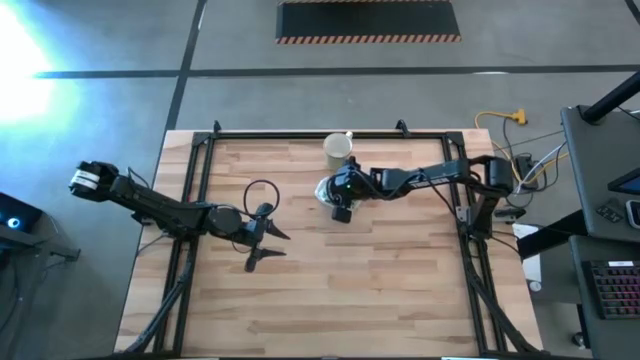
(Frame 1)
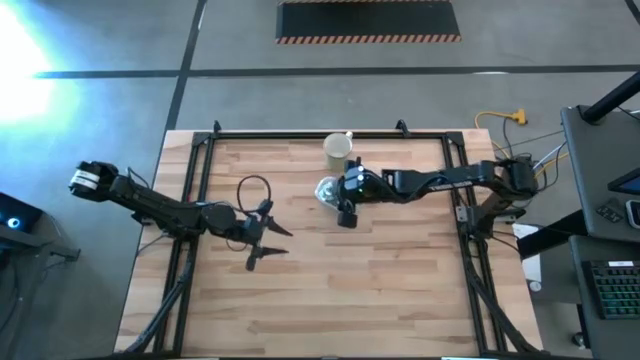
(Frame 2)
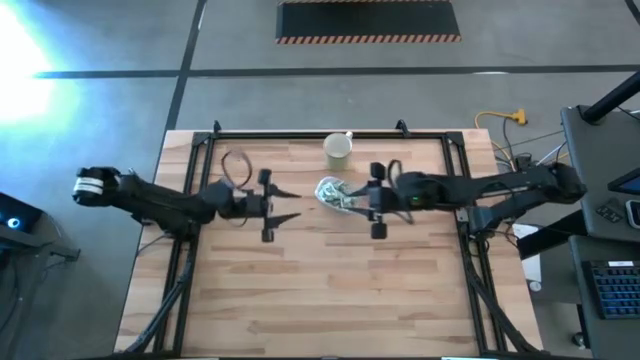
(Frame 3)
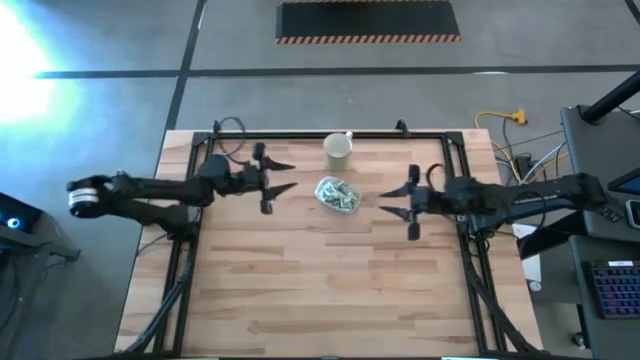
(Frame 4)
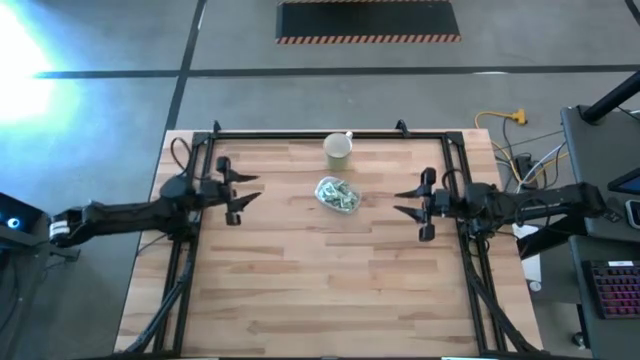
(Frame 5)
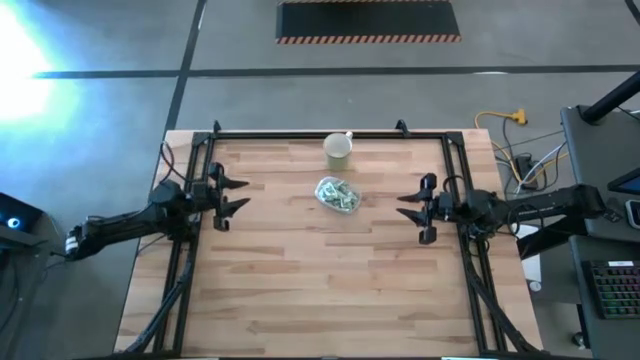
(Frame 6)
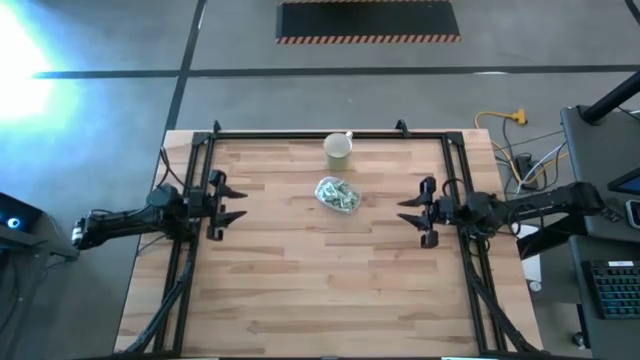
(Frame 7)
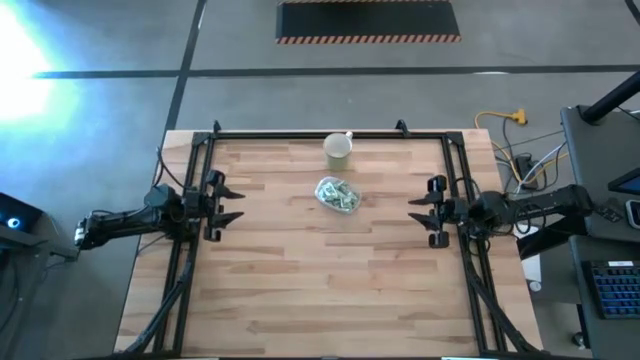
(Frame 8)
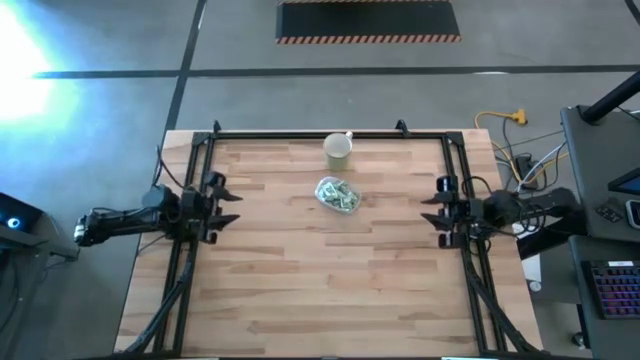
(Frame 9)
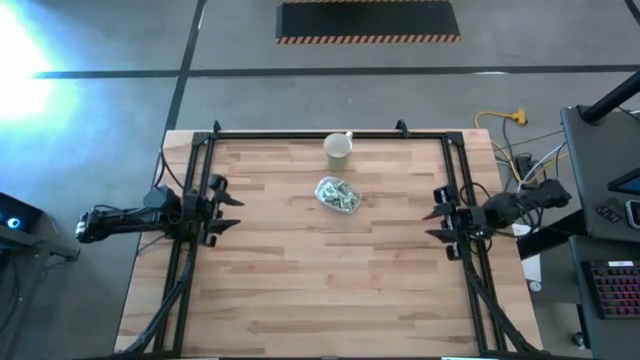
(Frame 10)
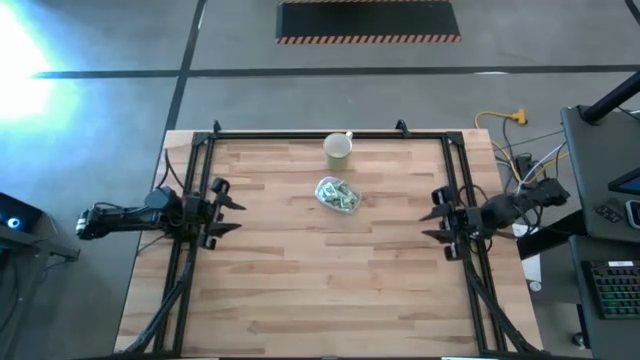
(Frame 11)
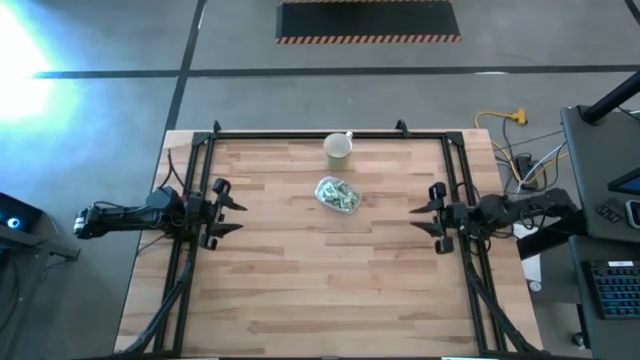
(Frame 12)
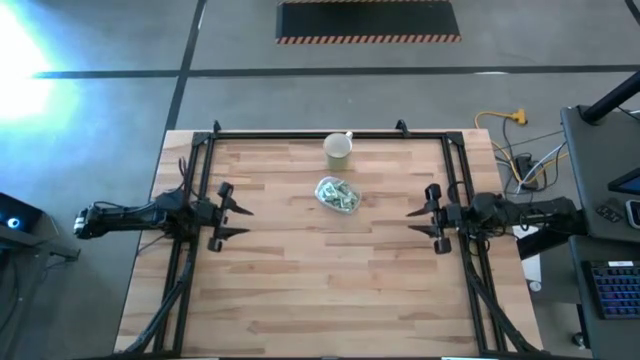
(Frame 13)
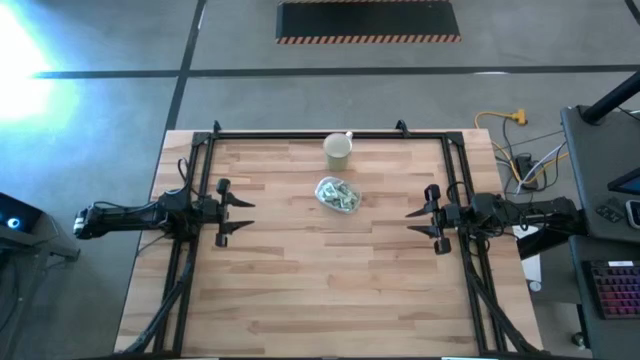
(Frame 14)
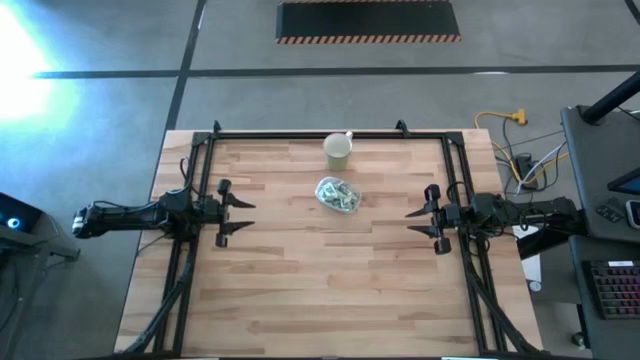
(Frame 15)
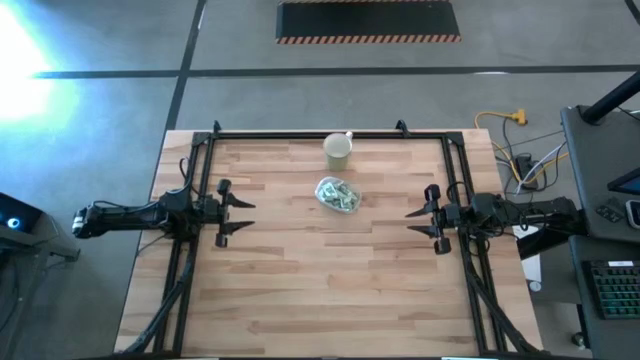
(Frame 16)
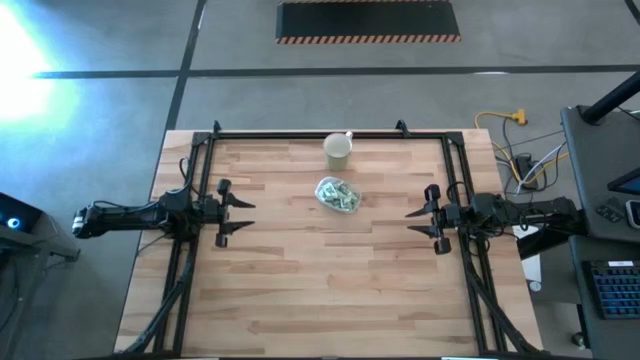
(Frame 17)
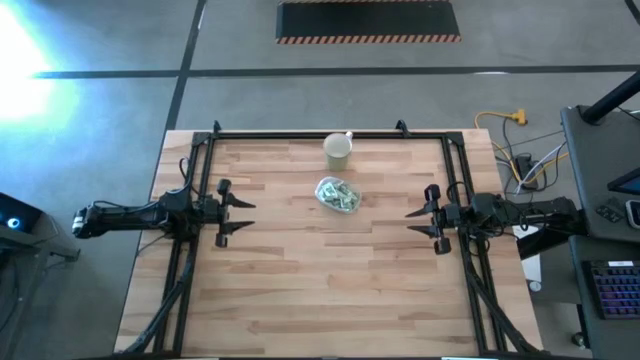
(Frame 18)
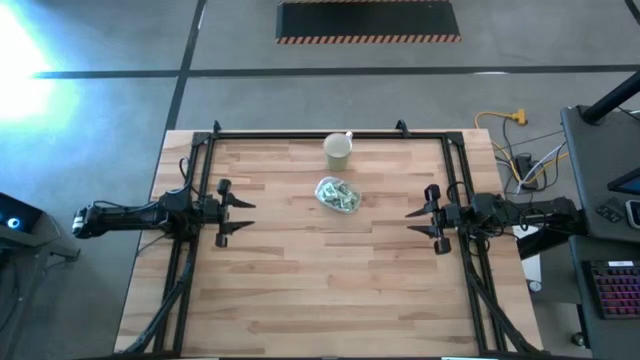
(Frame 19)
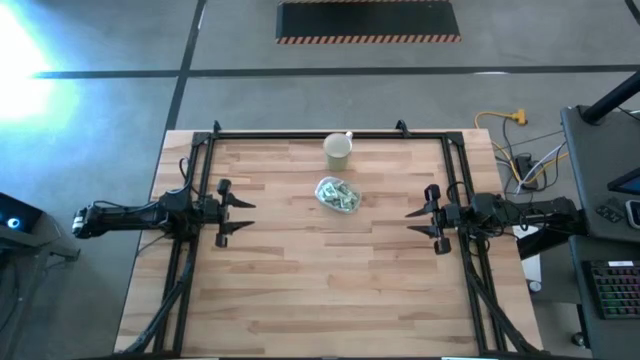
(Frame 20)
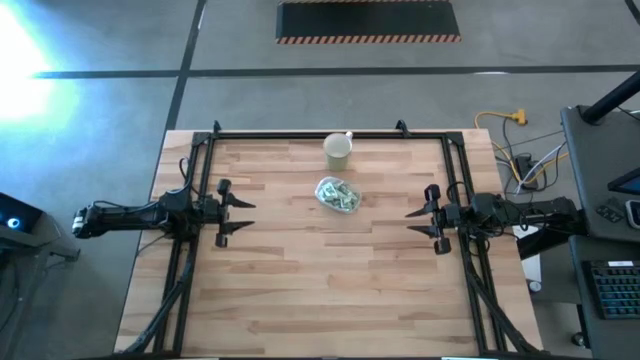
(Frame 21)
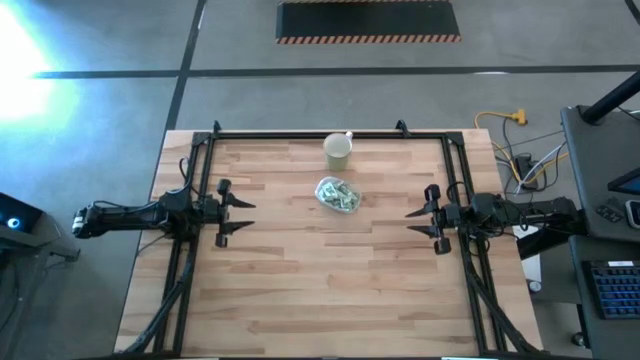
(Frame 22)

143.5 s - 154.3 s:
Task: Pick and place items into bin
Return to Home Position

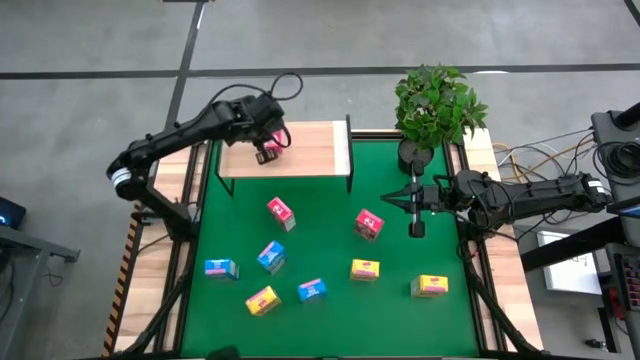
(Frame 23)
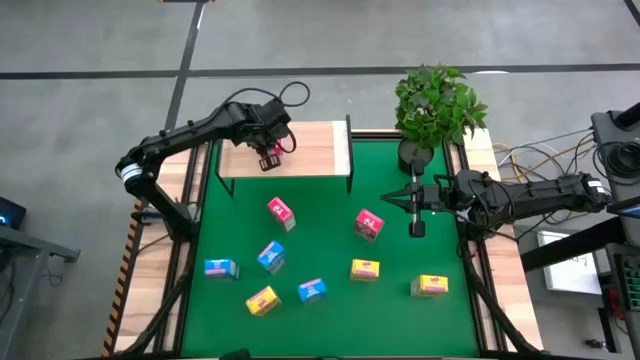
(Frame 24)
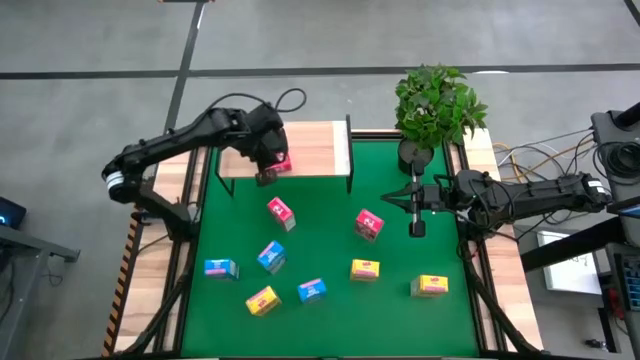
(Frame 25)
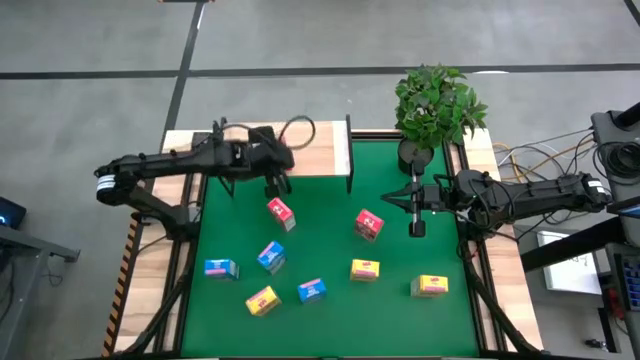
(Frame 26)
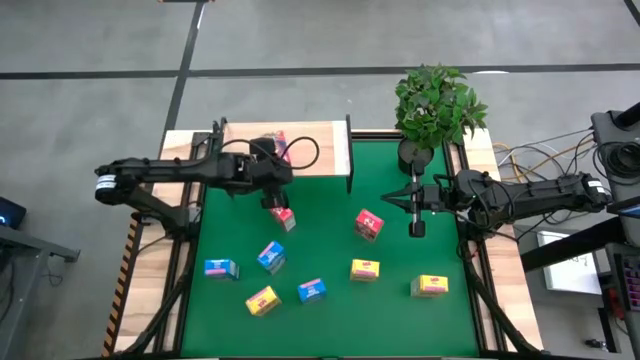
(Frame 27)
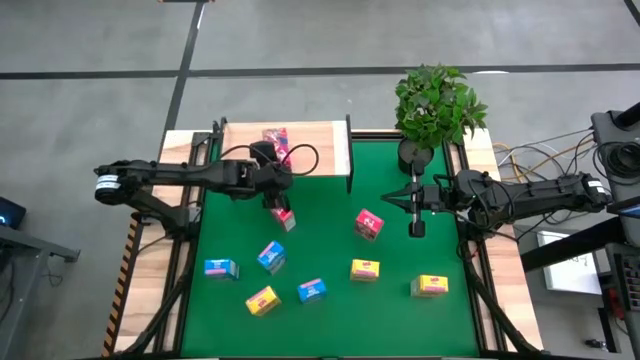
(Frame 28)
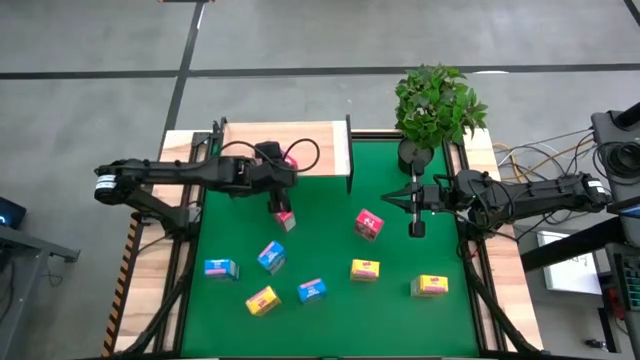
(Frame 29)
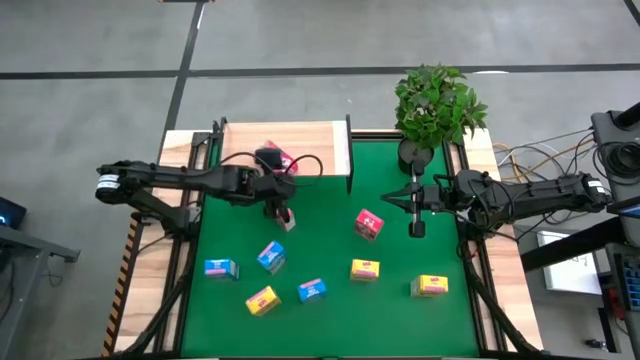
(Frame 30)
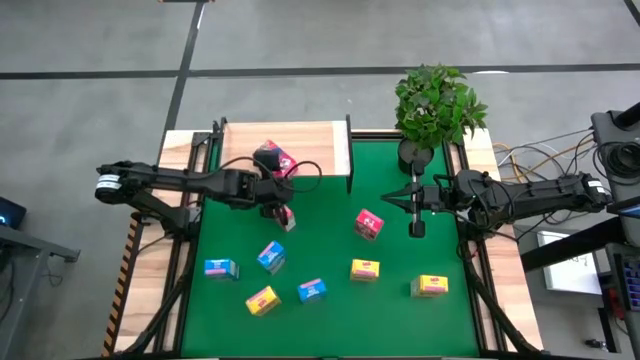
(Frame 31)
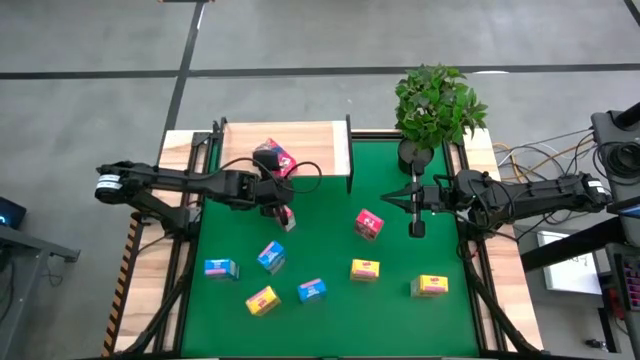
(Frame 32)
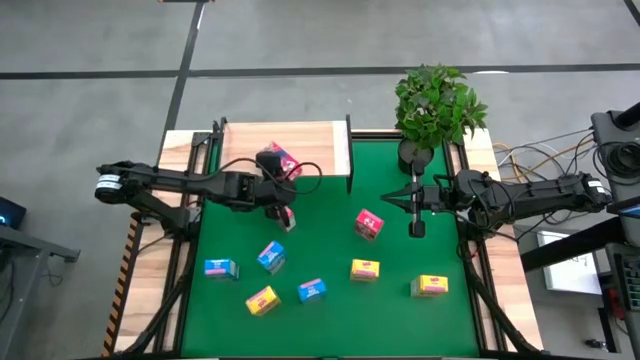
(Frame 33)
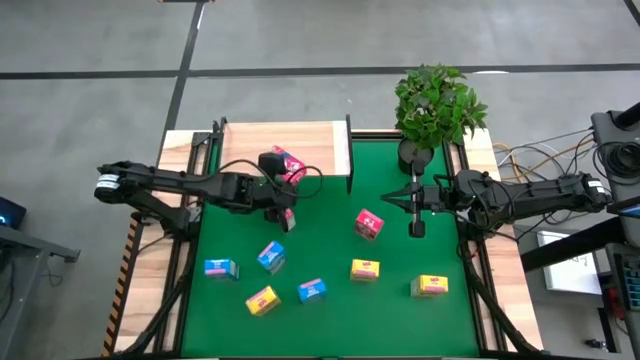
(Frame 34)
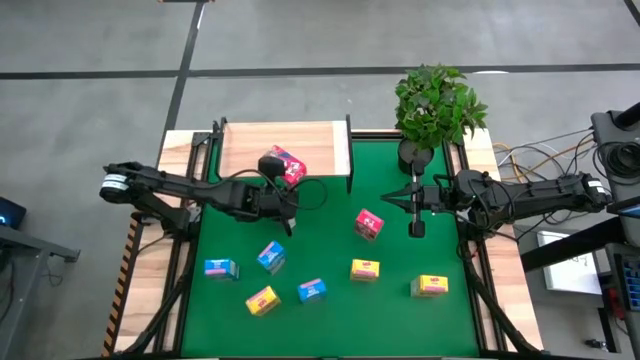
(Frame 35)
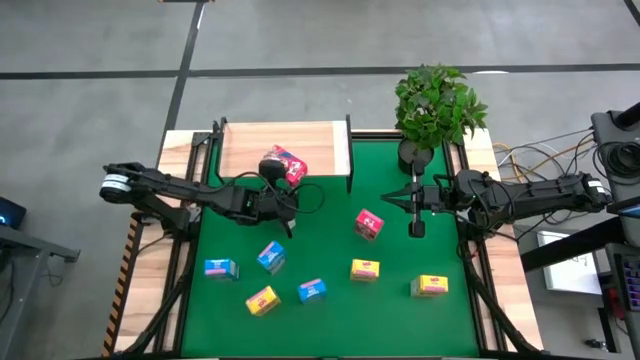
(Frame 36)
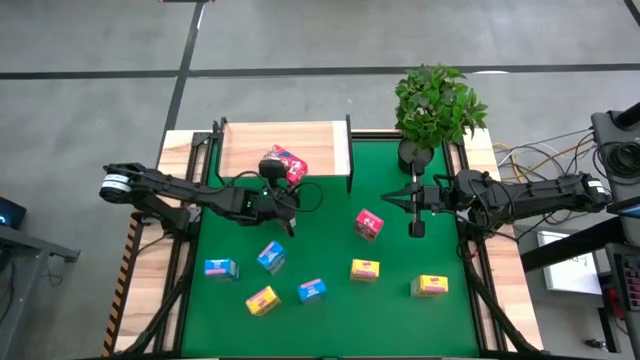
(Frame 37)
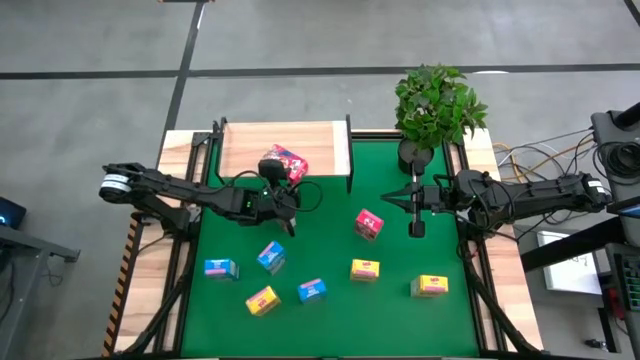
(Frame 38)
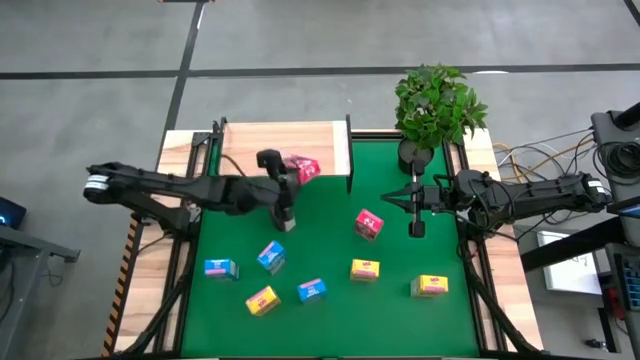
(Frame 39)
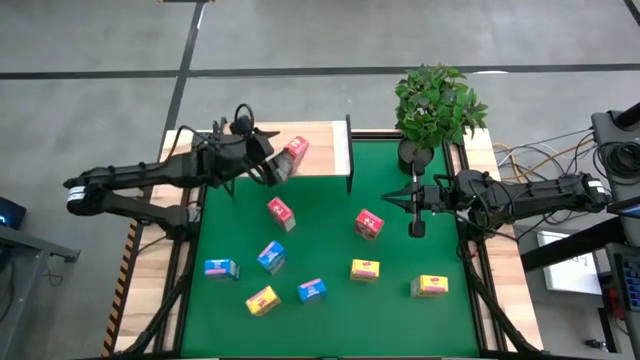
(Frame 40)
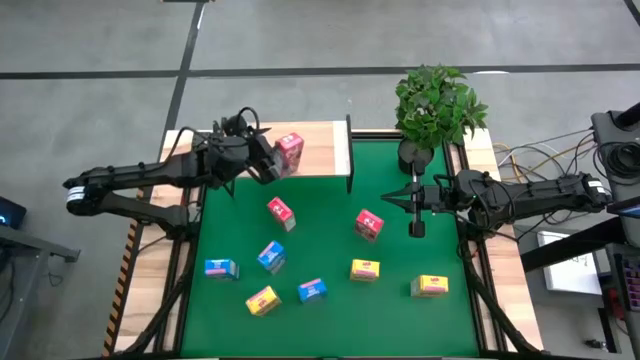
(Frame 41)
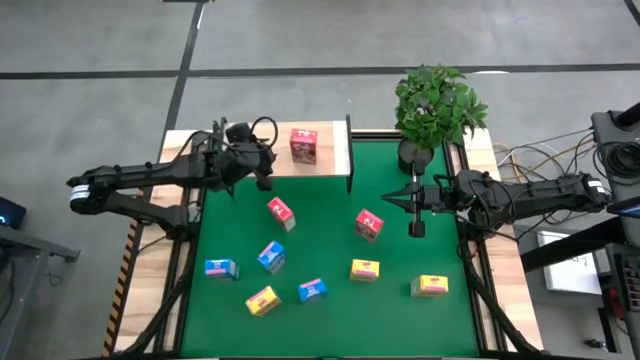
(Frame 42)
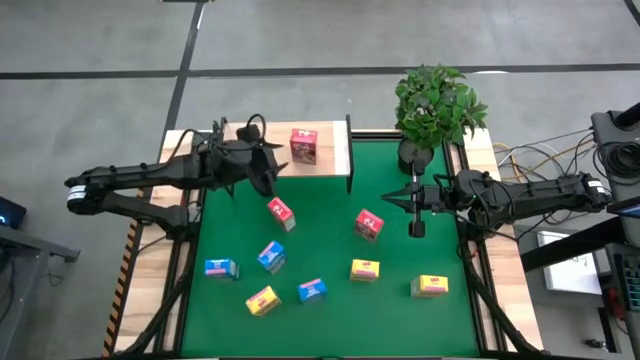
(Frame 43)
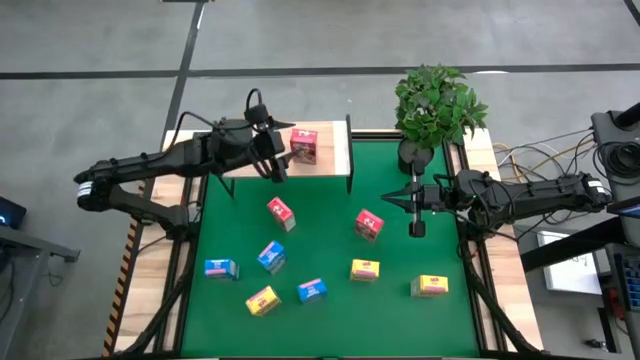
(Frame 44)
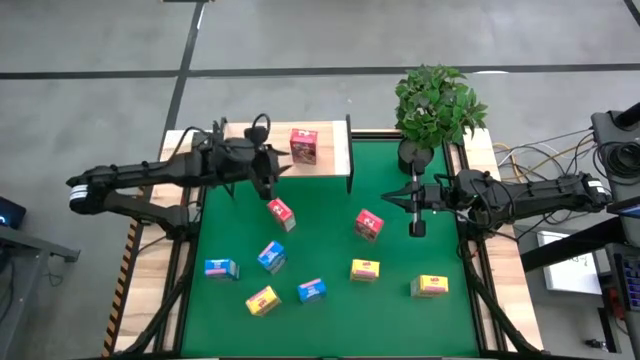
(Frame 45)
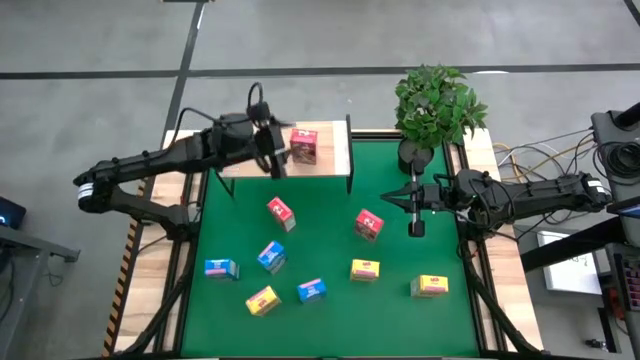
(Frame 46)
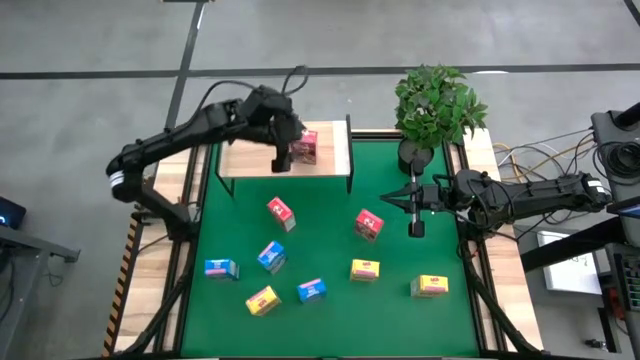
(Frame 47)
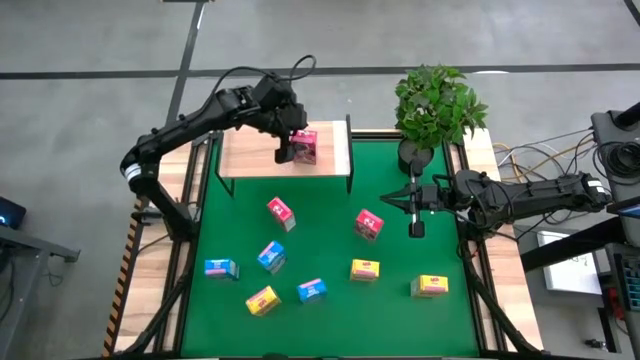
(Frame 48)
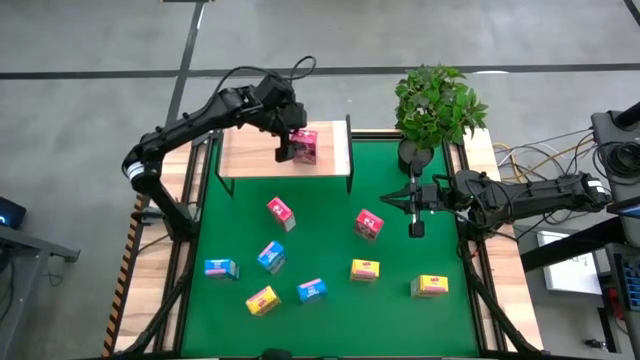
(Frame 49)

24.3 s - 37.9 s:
Task: Stack cereal on shelf
Adjust the red cereal on the shelf
